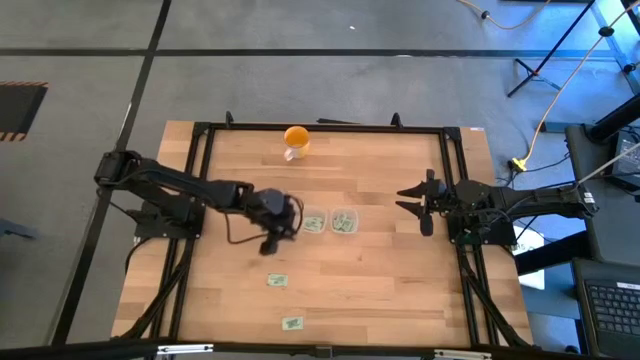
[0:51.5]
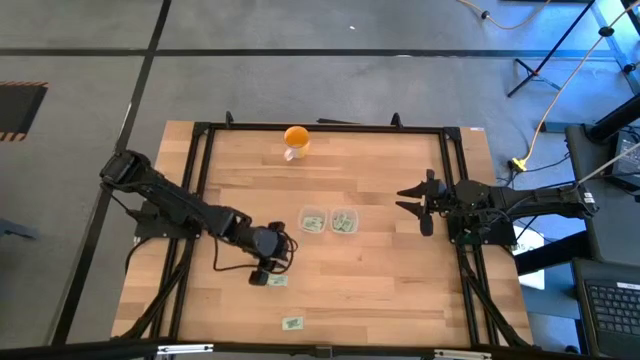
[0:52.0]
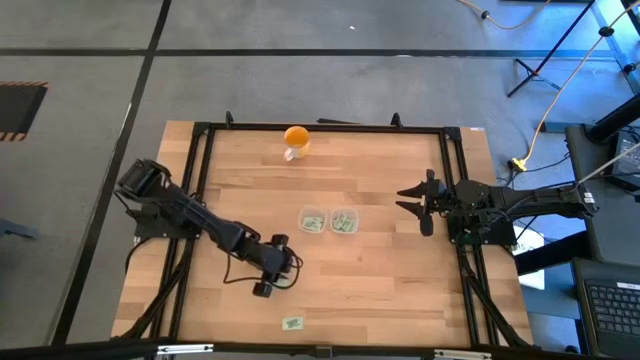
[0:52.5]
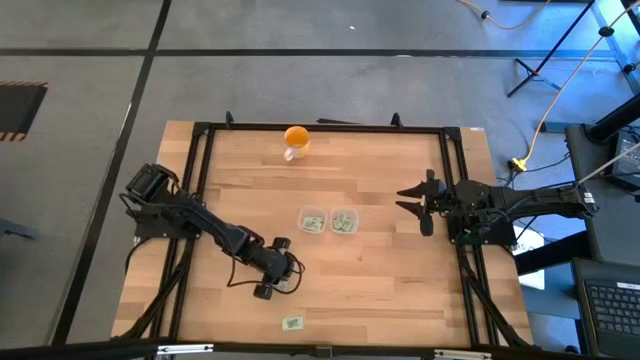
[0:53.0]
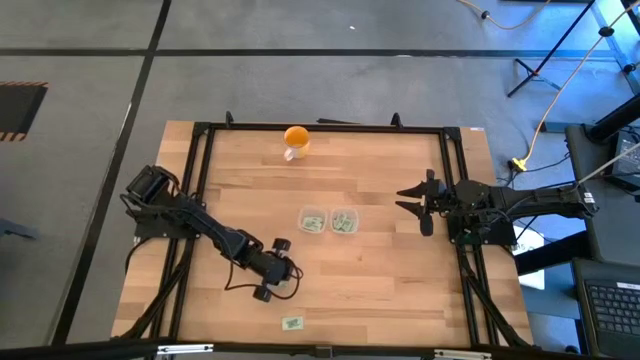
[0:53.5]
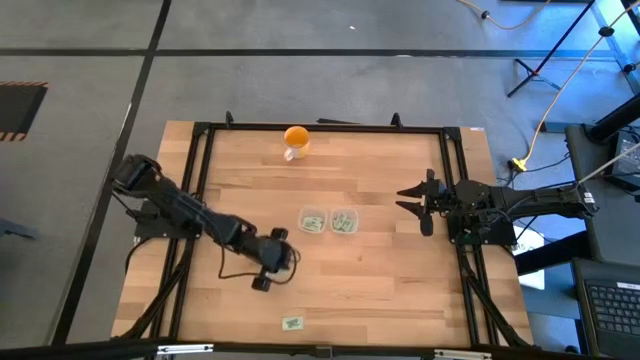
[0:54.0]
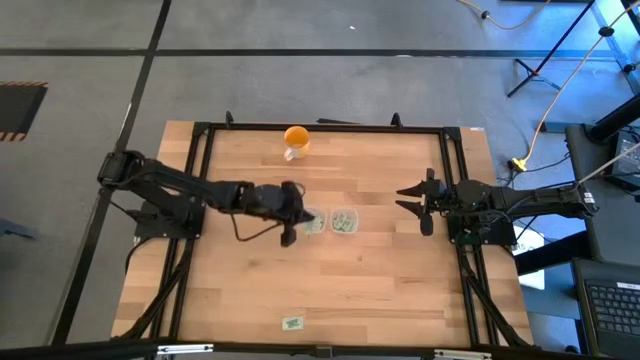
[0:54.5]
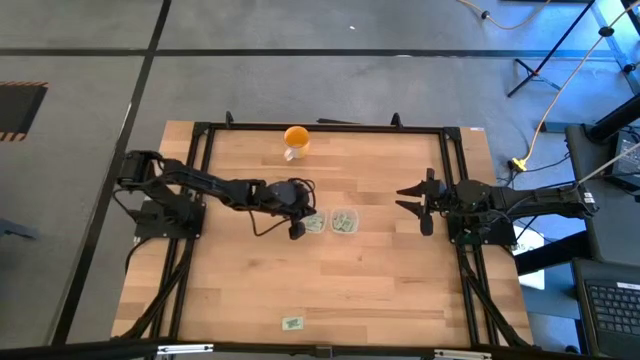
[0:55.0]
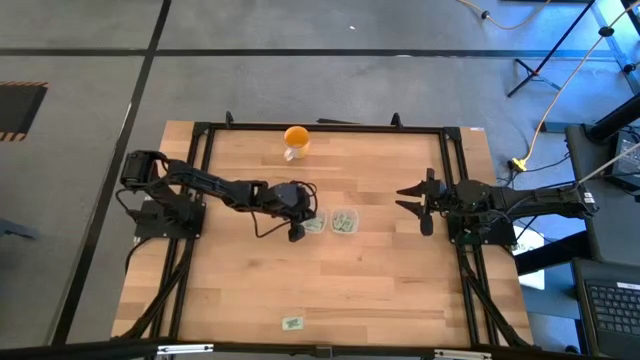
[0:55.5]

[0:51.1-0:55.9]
Task: Pick and place items into bin
Put the stevia packet into the left transparent bin

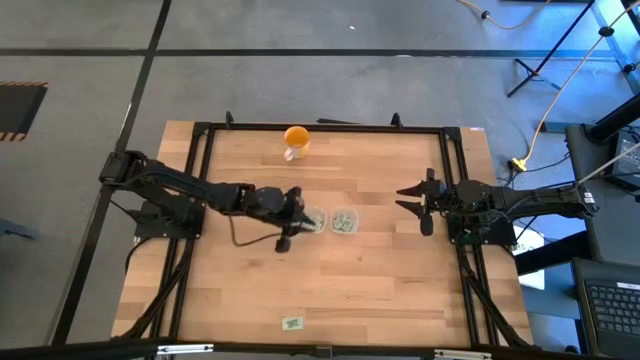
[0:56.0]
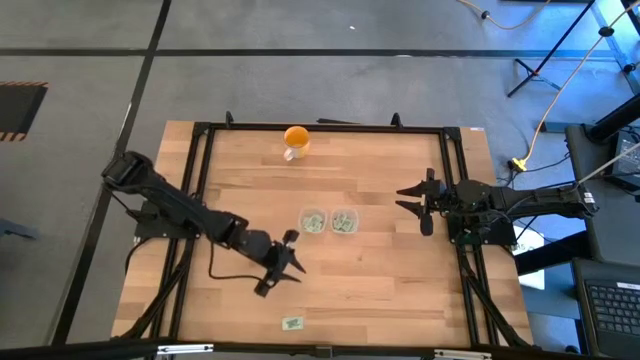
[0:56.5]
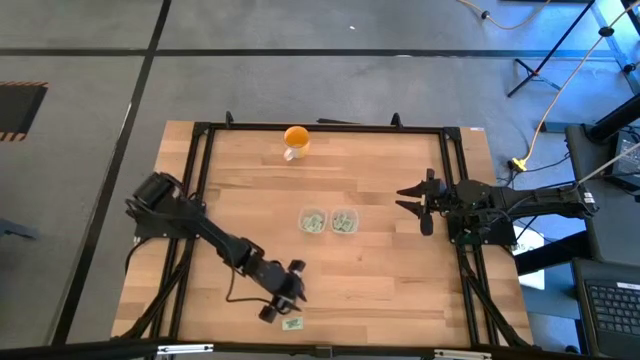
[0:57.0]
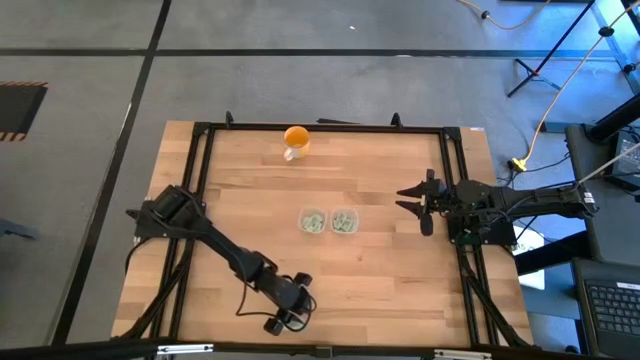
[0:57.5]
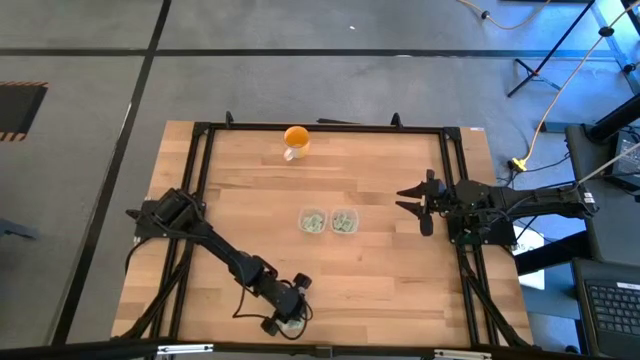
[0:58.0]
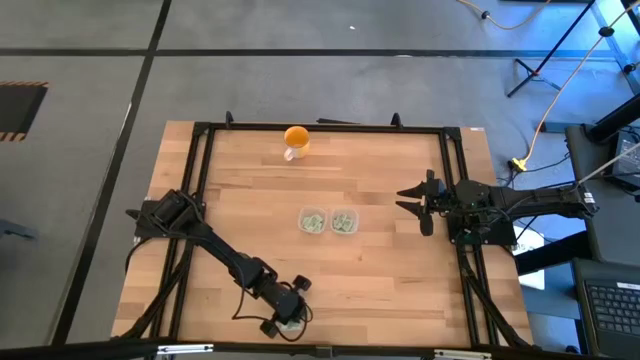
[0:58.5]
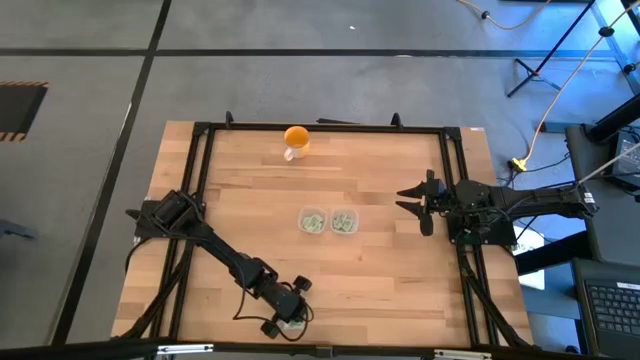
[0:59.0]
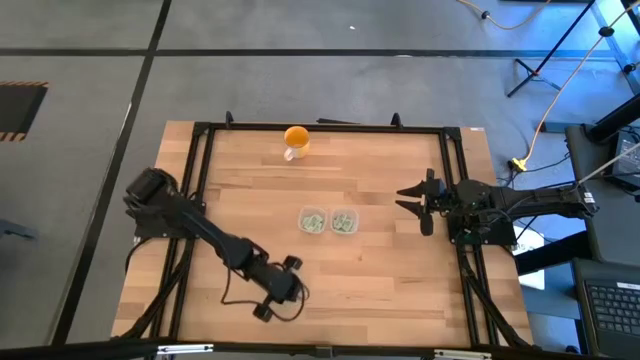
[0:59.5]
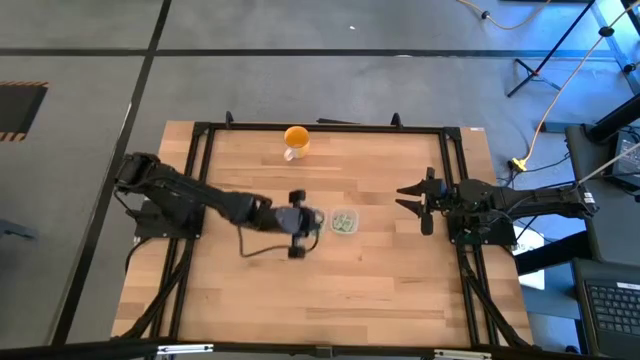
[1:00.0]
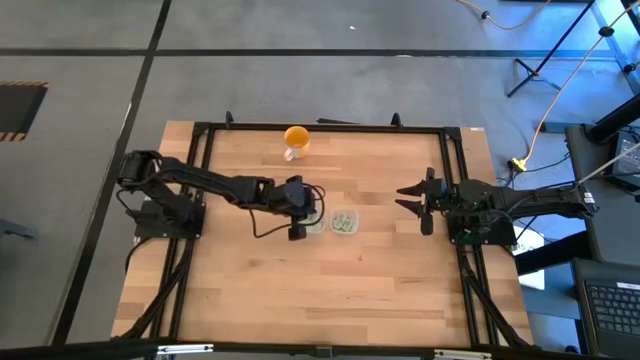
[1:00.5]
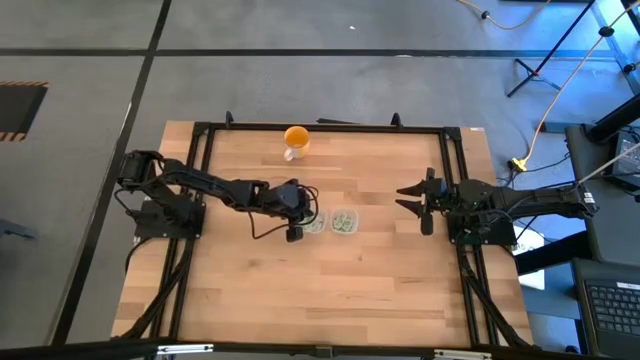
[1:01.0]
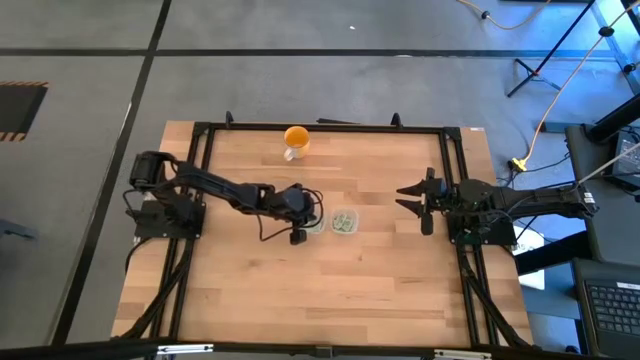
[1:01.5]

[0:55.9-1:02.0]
Put the stevia packet into the left transparent bin

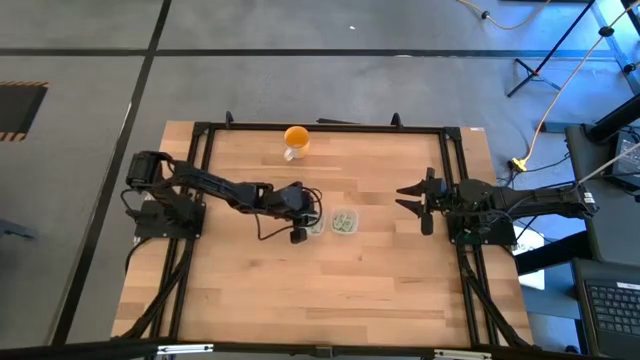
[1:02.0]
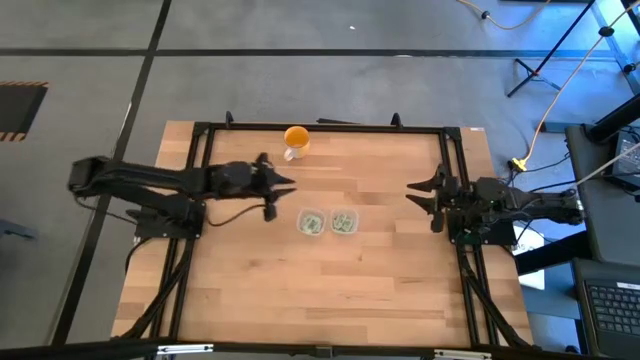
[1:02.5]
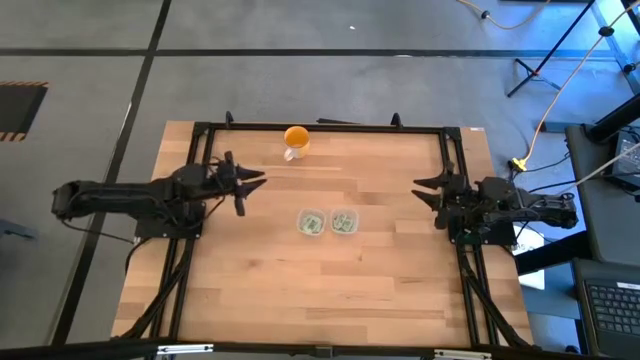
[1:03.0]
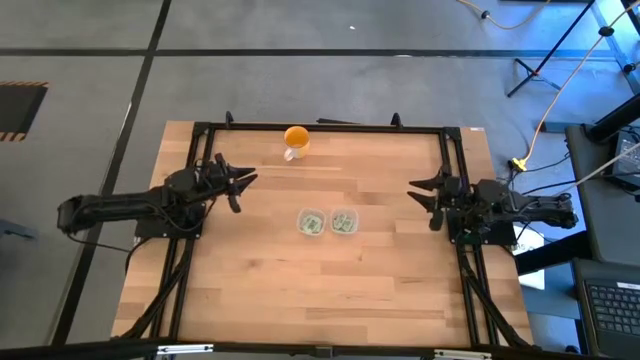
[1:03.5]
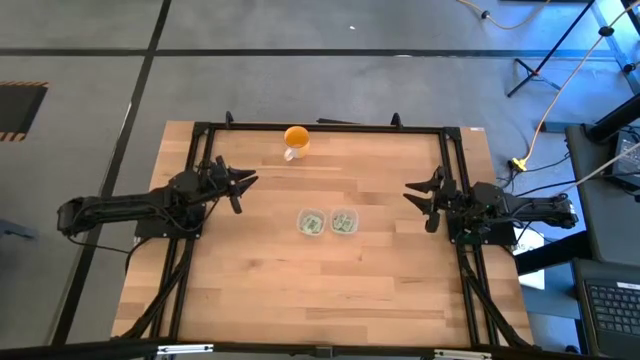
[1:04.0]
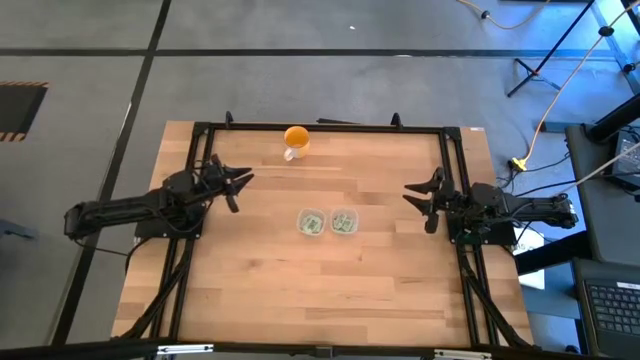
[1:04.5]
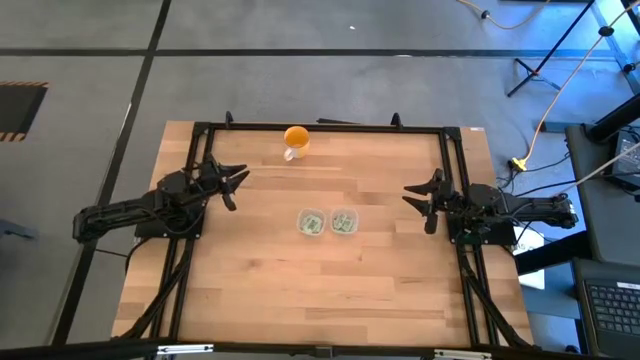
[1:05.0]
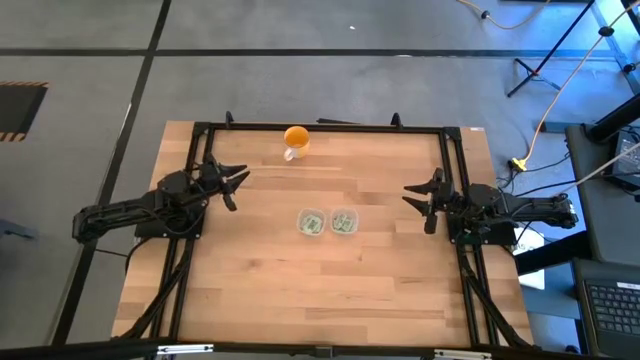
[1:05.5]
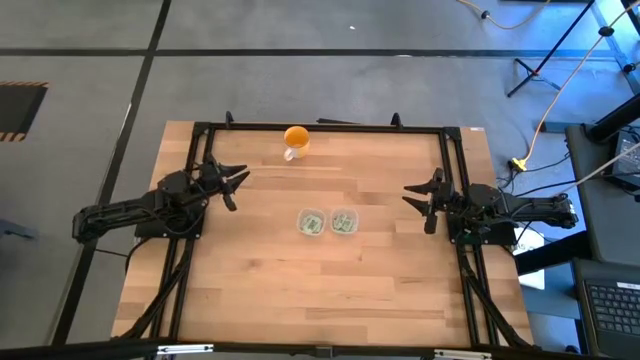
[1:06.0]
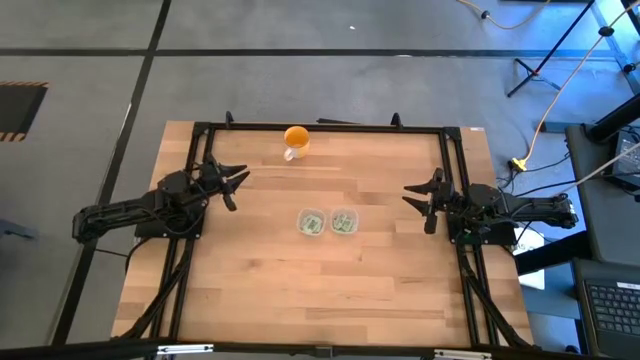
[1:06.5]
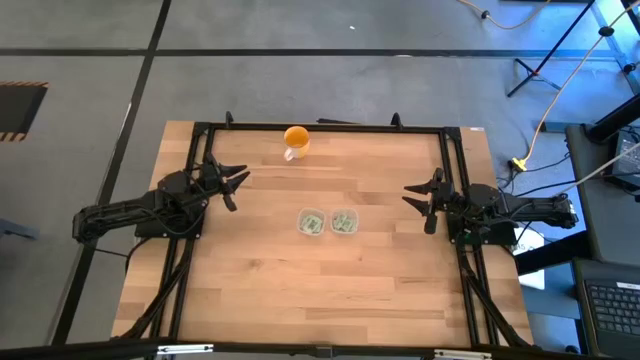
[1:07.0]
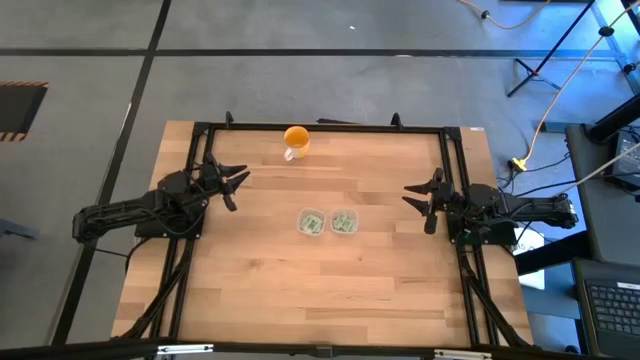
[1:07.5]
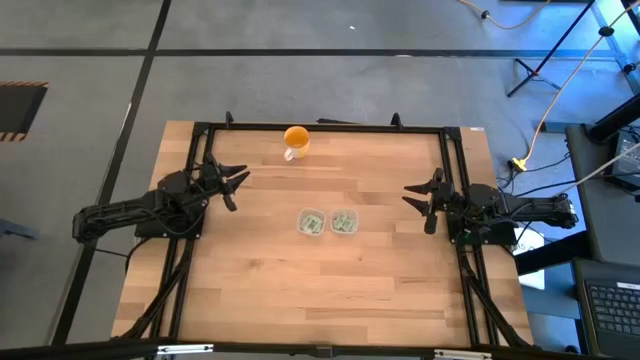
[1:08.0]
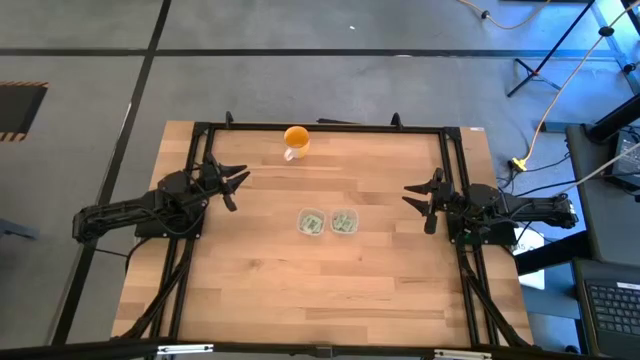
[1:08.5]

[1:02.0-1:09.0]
Return to Home Position

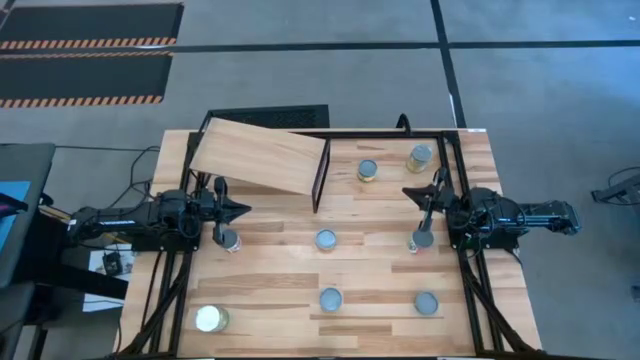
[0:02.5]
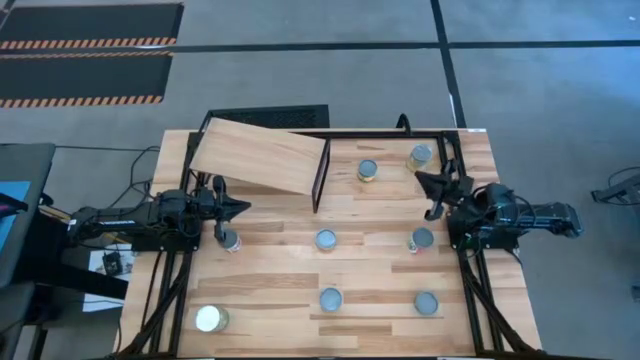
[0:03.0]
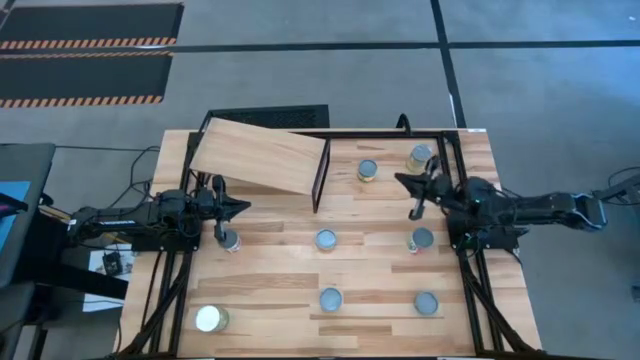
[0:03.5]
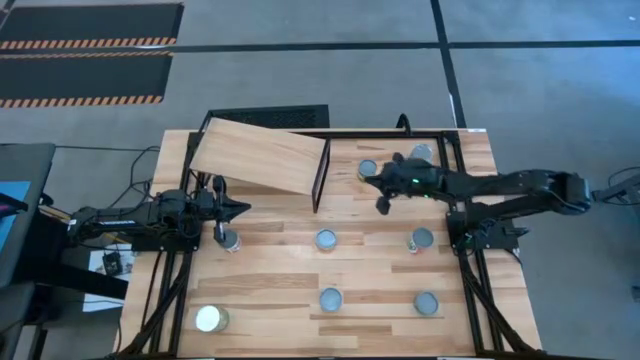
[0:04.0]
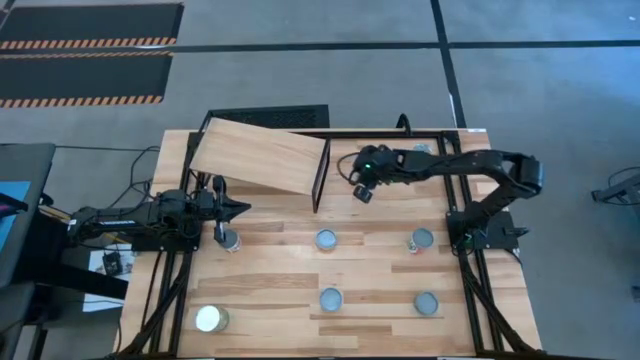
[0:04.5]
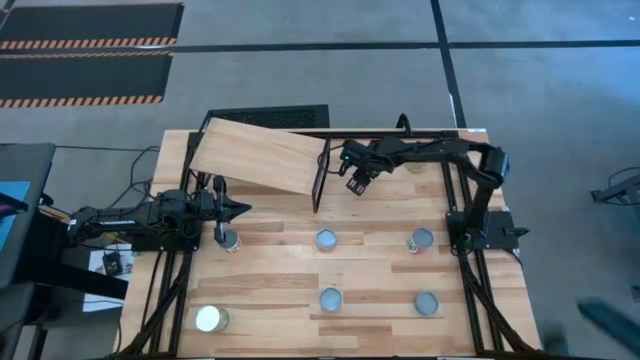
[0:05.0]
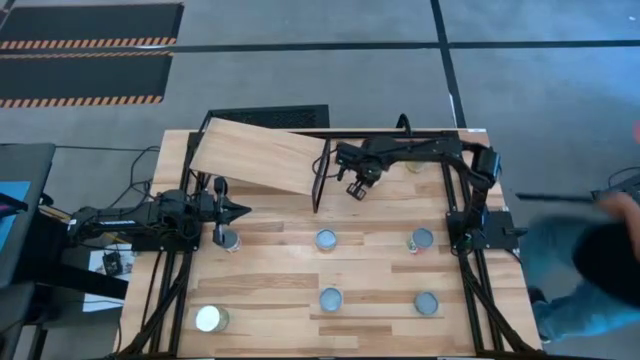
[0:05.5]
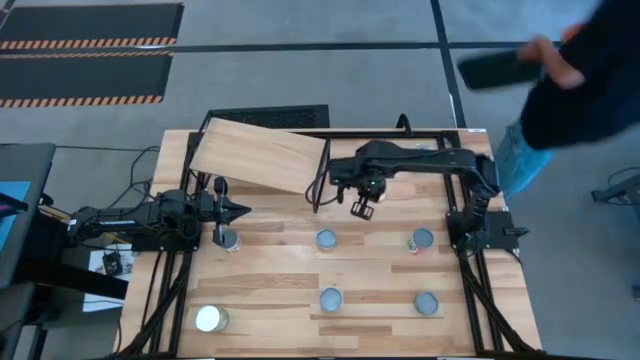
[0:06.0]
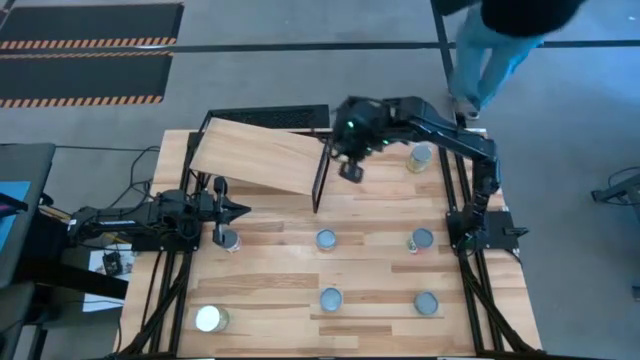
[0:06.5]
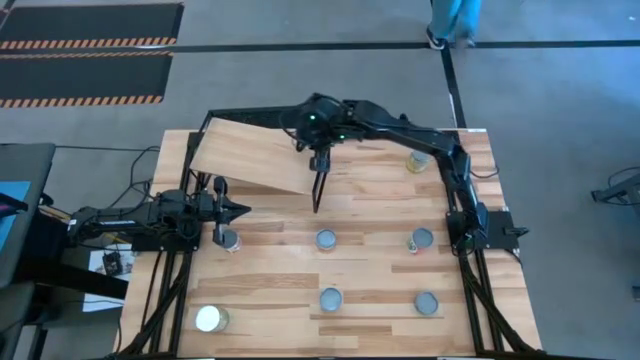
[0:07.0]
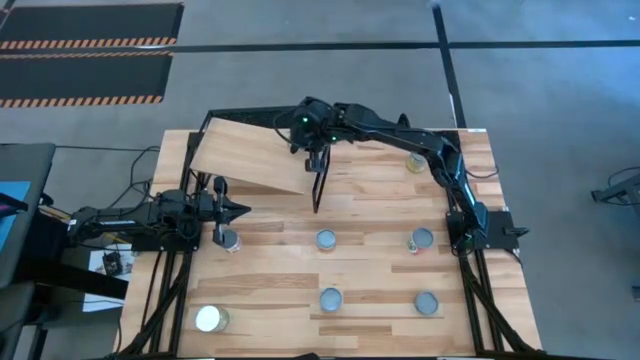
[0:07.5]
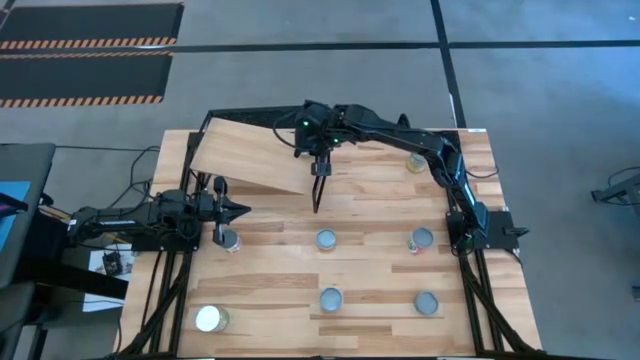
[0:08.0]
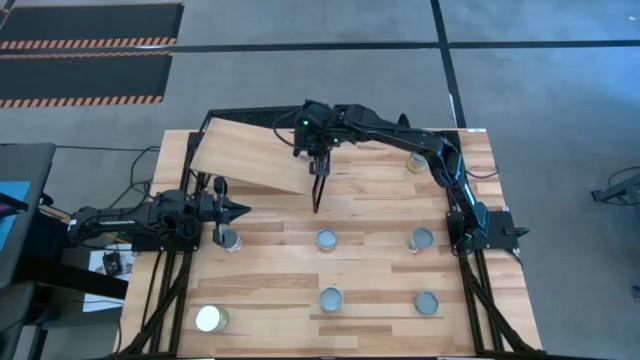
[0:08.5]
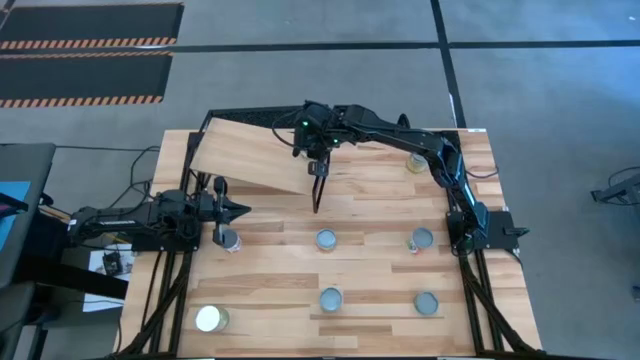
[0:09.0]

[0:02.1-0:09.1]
Task: Pick and place cans onto a shelf
Put the canned sliced peaches can on the shelf
